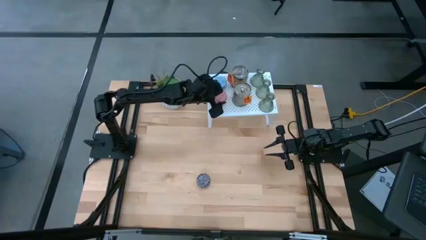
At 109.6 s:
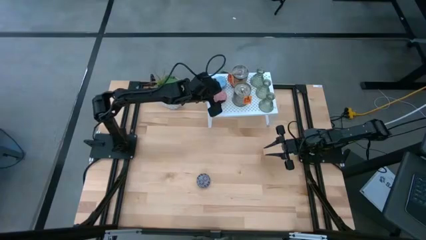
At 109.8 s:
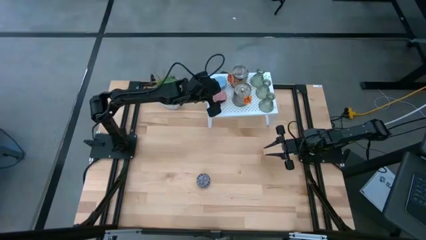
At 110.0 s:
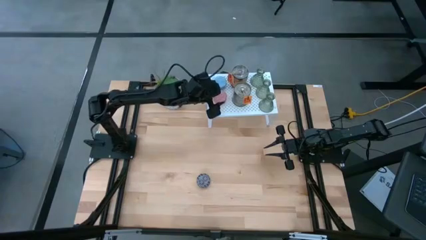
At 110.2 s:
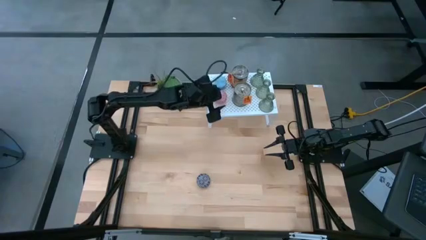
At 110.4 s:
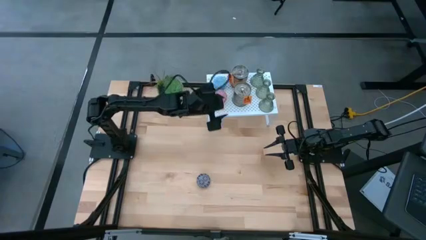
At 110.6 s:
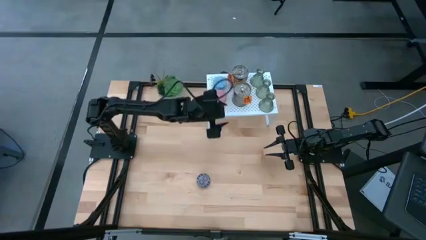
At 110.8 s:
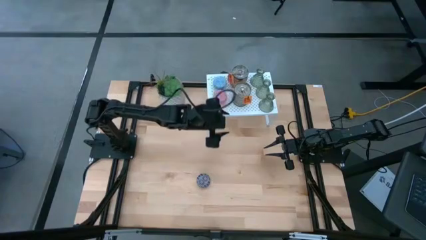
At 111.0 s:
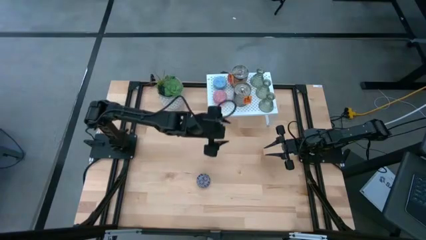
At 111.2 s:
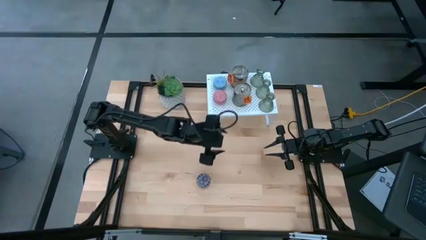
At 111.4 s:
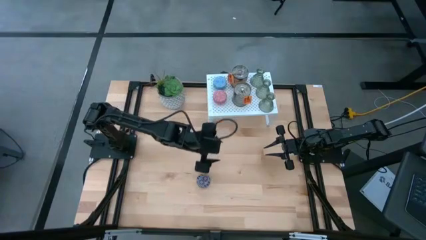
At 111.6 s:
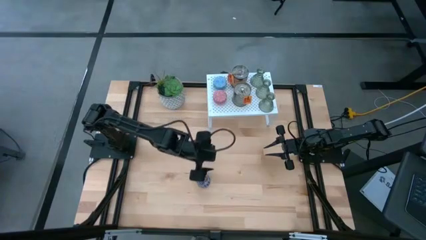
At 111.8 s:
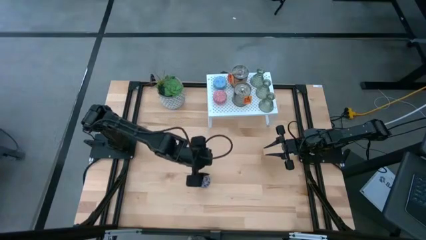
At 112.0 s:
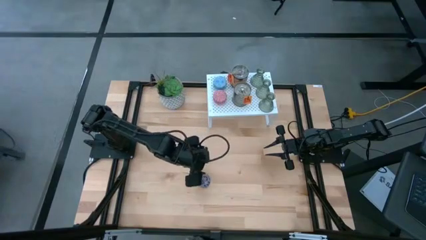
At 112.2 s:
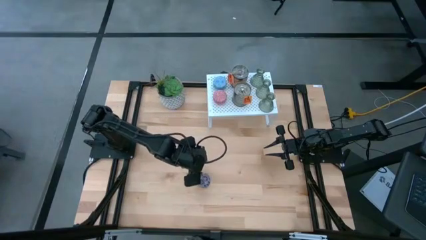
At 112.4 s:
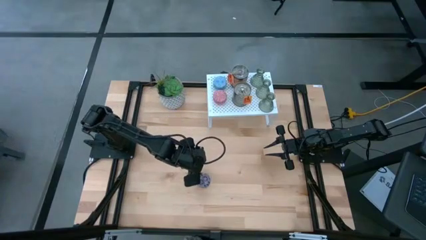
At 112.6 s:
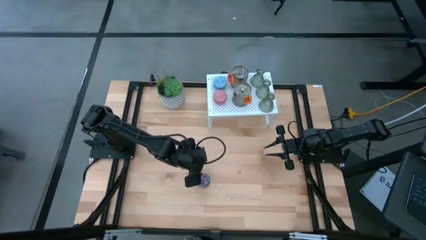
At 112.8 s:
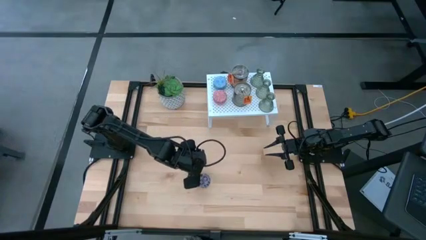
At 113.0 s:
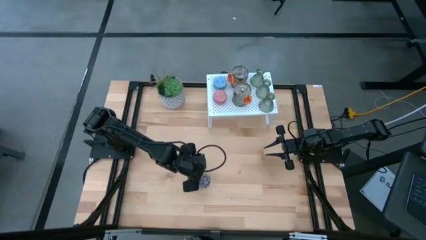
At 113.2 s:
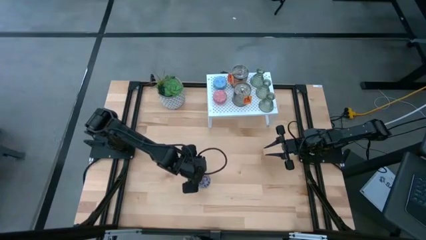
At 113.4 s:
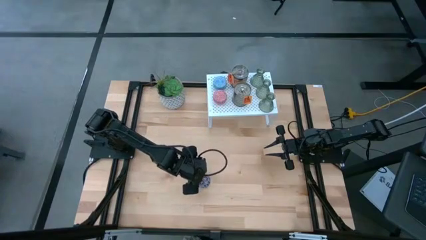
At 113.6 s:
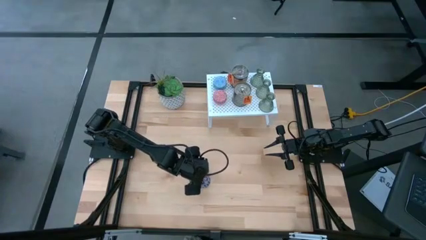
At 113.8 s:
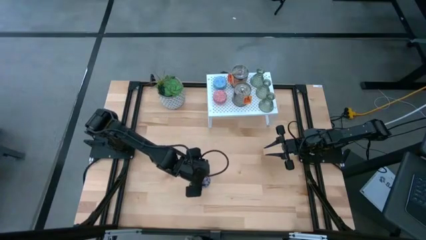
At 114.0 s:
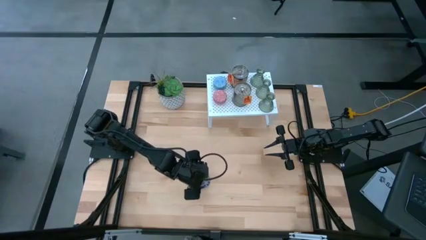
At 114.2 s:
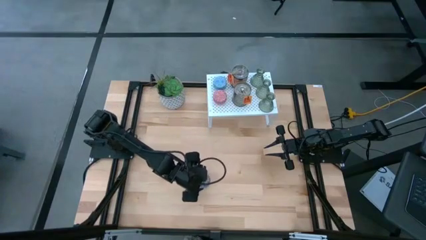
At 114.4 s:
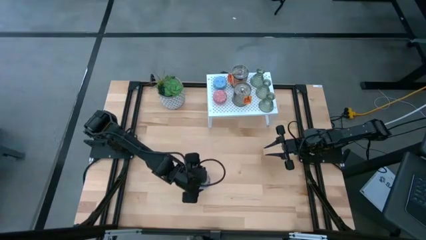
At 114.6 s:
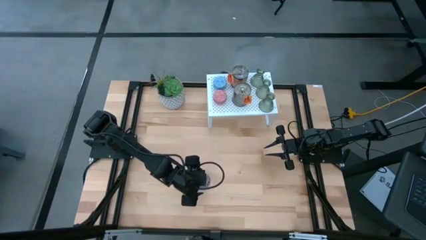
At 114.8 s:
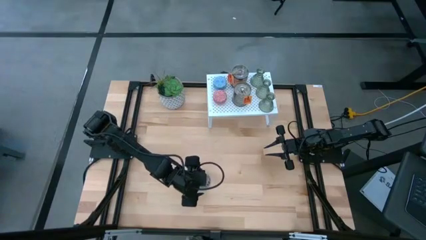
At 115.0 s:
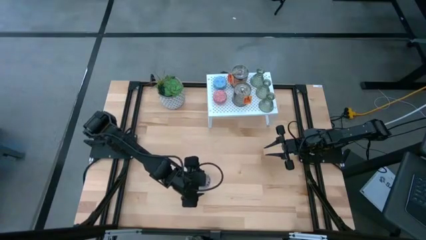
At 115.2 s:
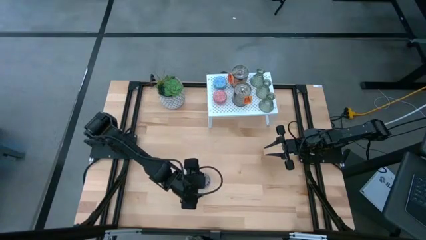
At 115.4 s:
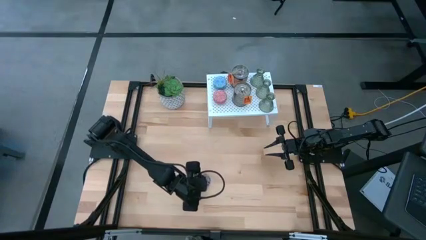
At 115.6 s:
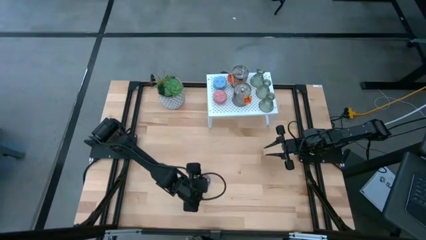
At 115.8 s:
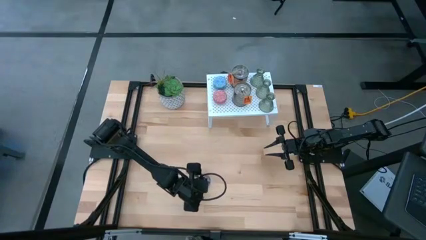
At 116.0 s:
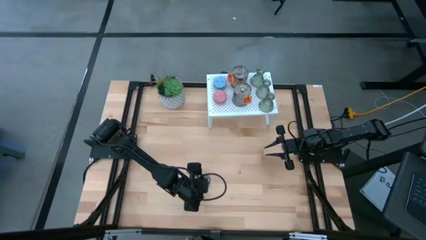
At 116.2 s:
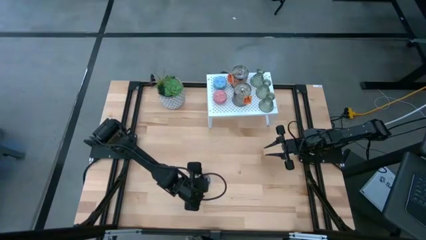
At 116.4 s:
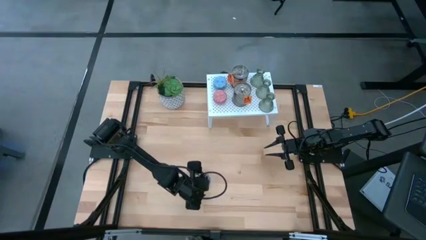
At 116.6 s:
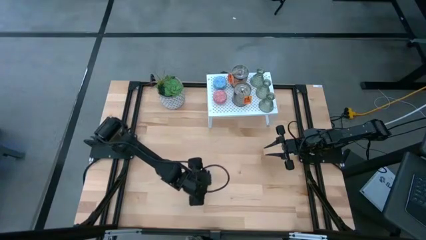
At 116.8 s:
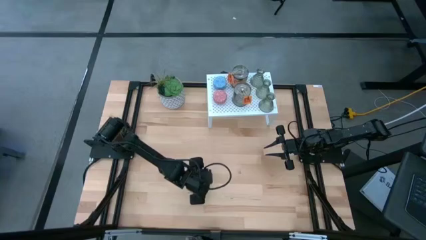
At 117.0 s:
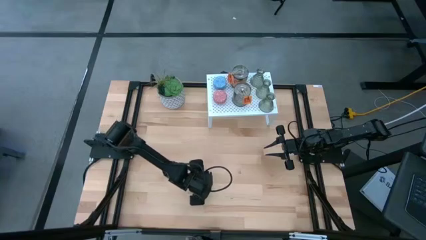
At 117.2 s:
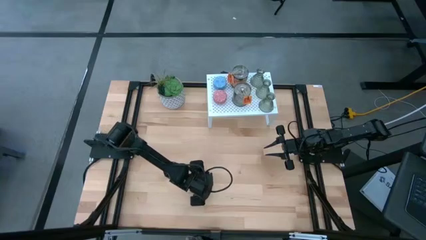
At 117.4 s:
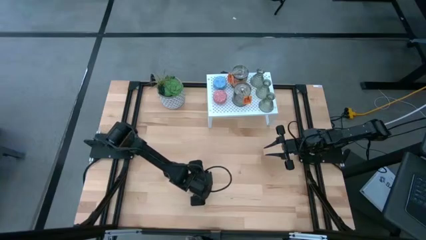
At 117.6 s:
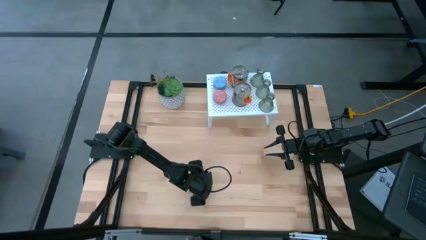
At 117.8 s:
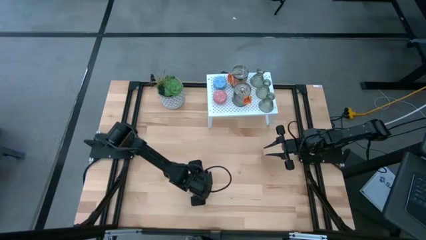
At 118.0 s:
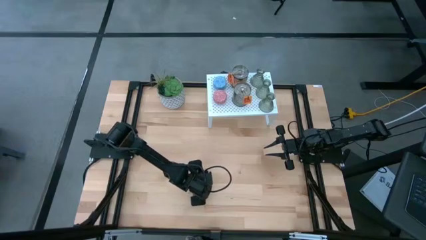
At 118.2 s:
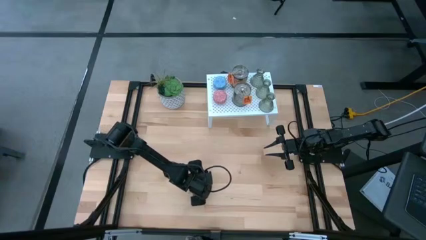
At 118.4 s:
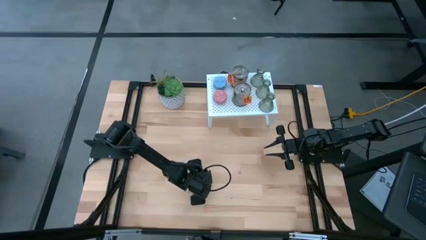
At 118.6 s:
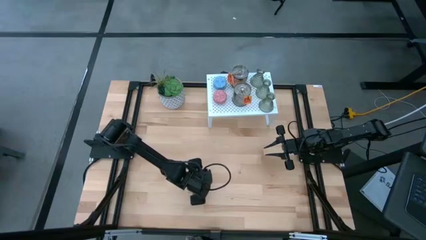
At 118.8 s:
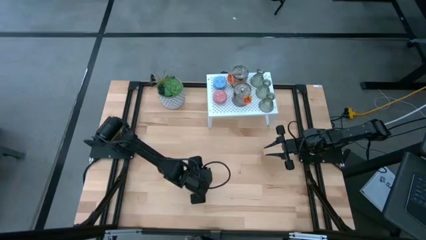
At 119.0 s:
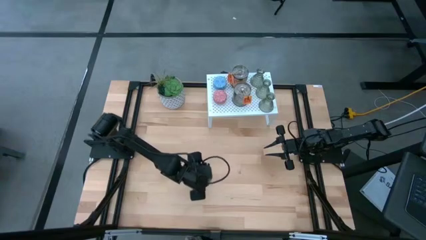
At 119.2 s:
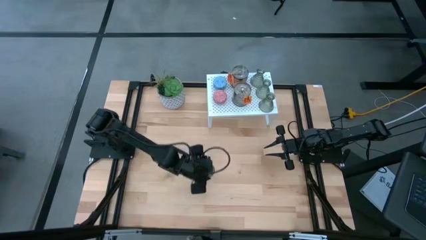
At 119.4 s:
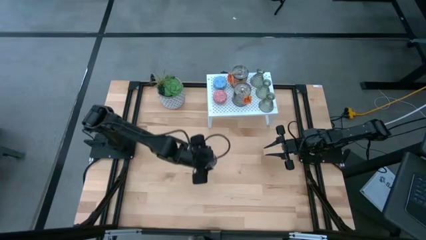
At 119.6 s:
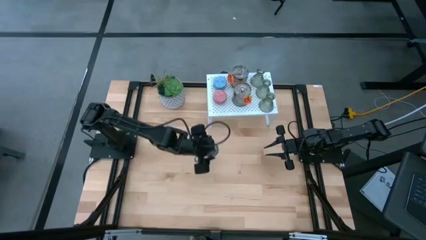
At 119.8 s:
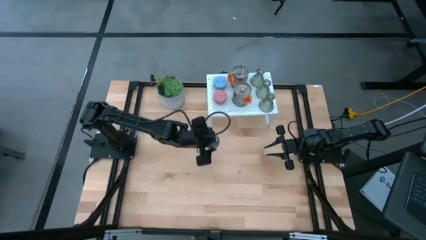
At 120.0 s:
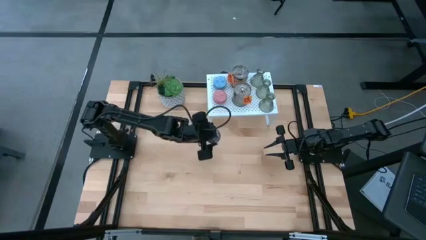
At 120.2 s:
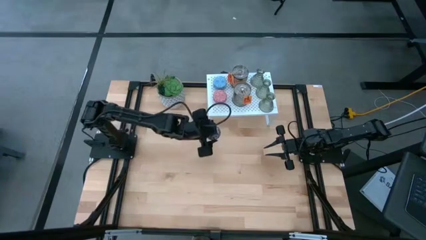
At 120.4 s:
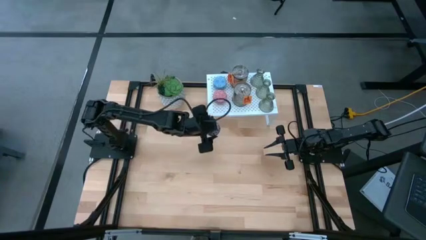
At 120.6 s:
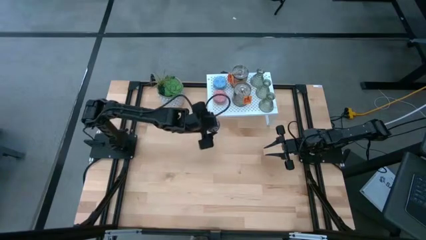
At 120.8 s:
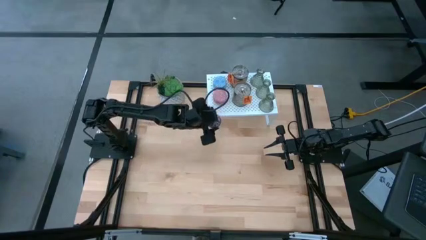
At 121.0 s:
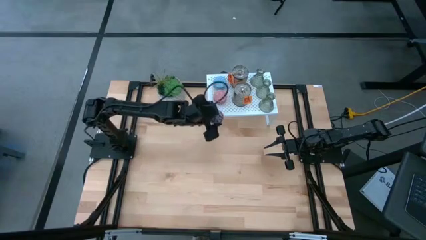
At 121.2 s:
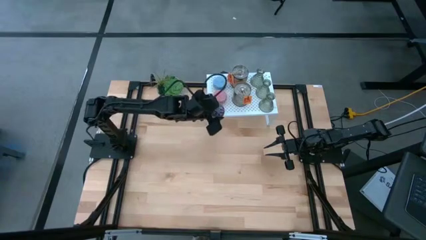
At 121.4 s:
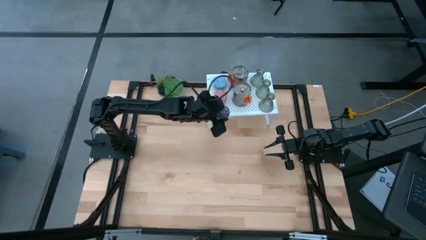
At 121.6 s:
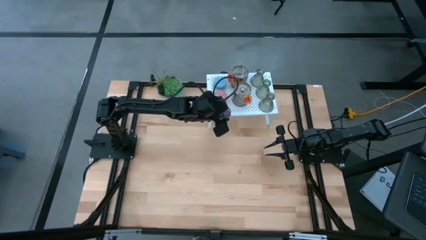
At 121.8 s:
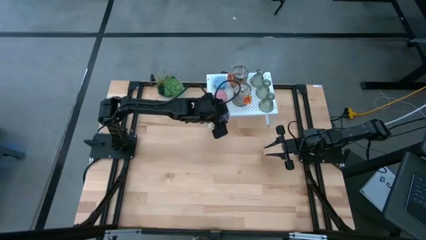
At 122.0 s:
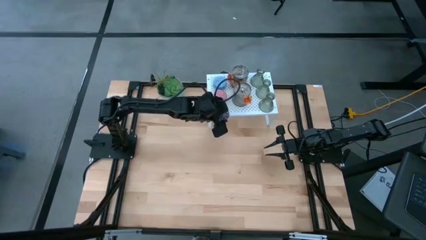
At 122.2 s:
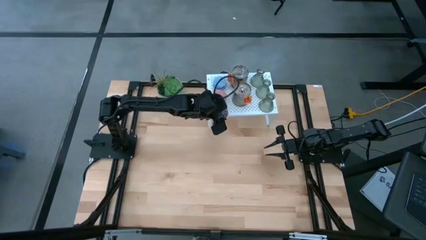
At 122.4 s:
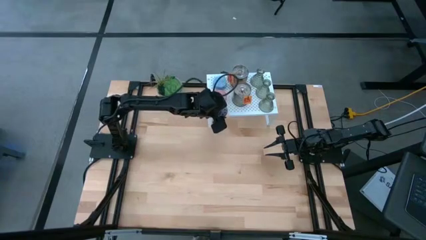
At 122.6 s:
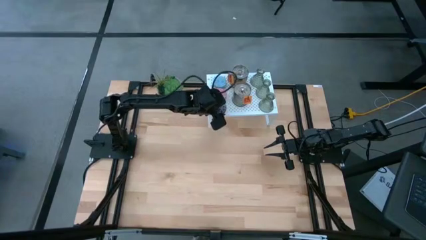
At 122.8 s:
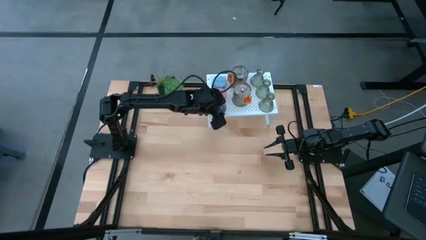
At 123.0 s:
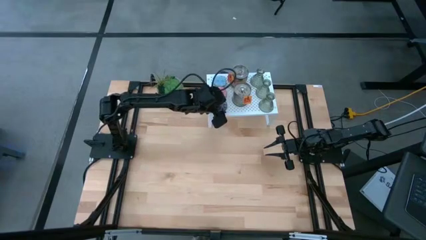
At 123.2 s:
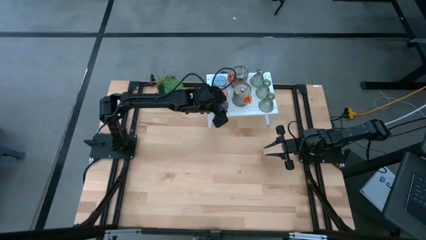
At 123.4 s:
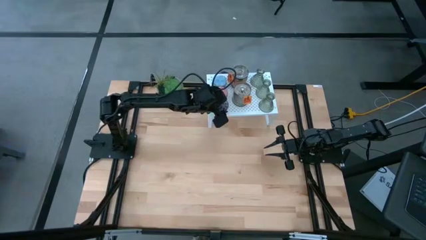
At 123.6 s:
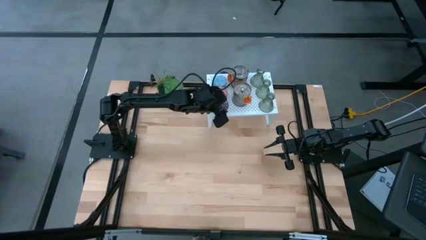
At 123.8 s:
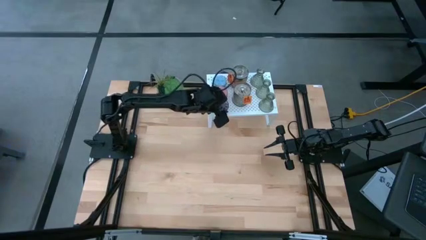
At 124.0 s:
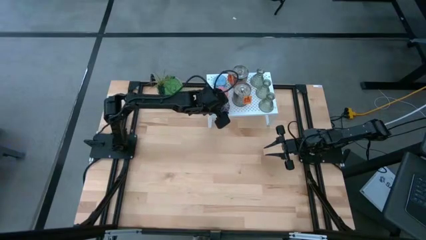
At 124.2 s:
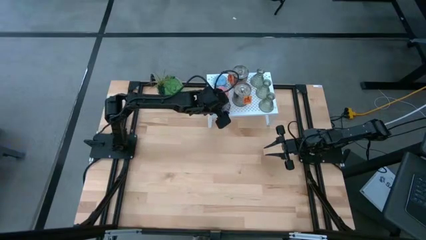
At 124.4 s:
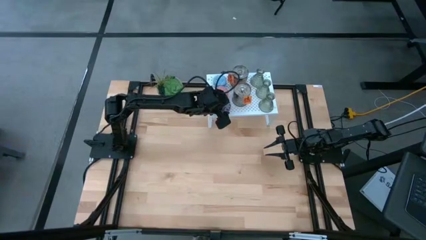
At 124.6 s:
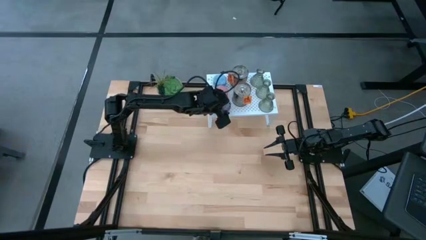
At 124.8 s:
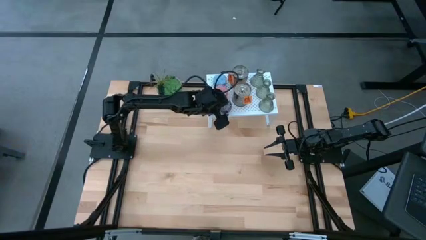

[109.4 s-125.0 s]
Task: Pick & Place candle stick holders
Put the black scented candle on the shelf aligned with the blue and pink scented candles
